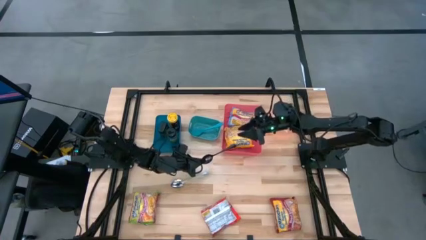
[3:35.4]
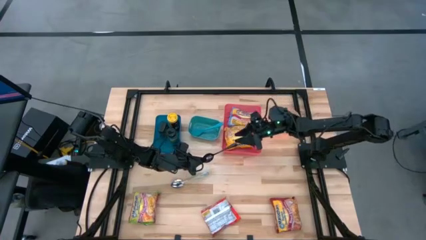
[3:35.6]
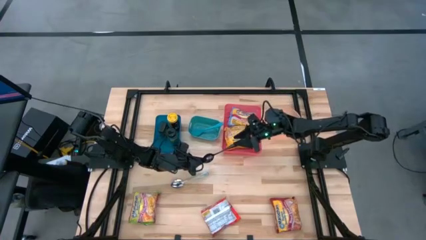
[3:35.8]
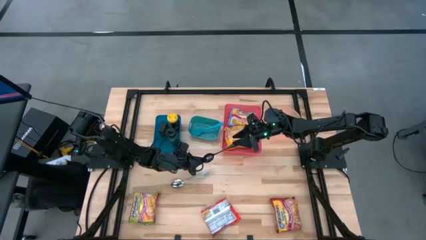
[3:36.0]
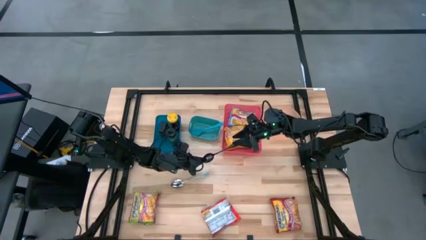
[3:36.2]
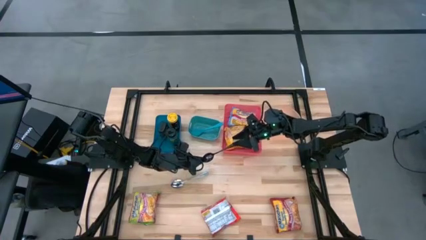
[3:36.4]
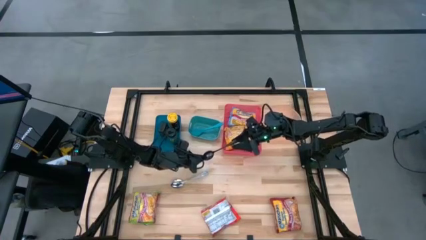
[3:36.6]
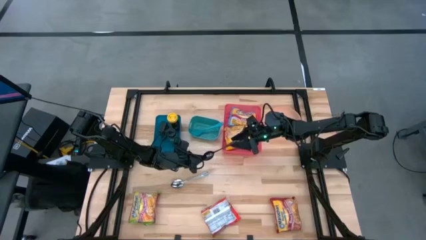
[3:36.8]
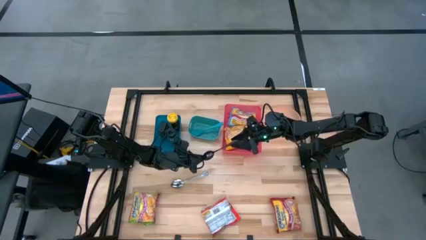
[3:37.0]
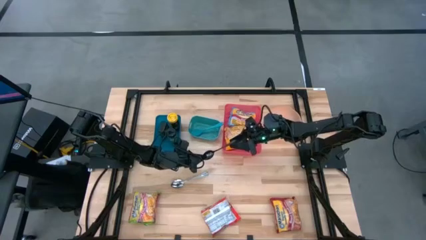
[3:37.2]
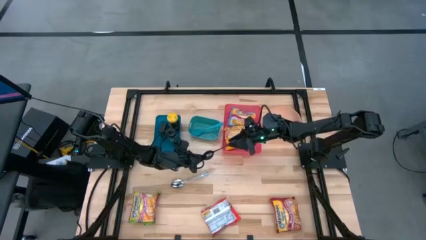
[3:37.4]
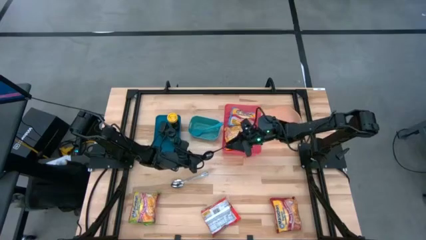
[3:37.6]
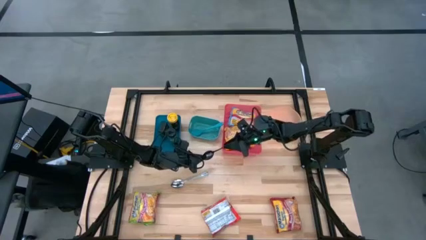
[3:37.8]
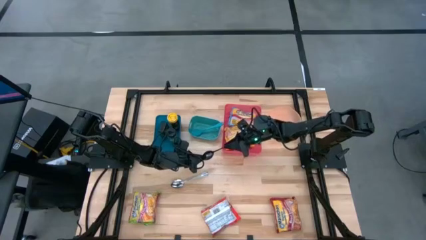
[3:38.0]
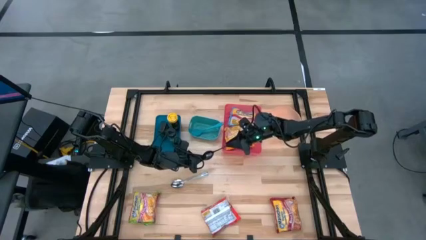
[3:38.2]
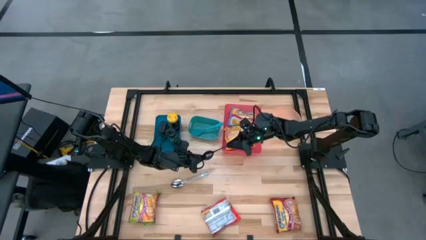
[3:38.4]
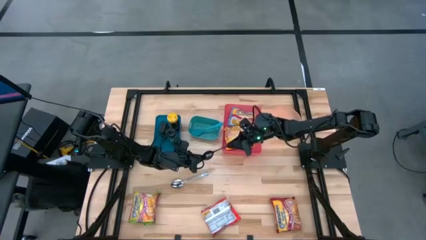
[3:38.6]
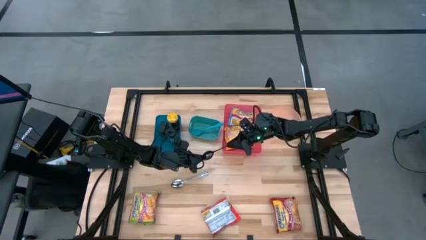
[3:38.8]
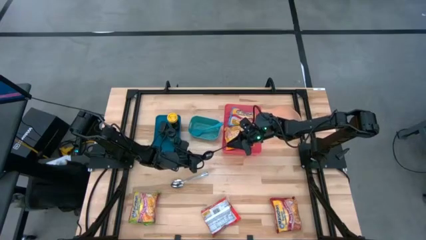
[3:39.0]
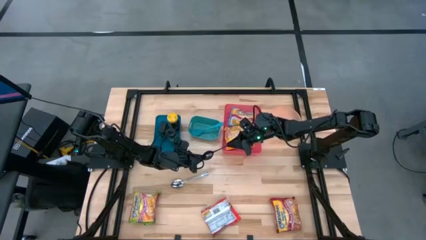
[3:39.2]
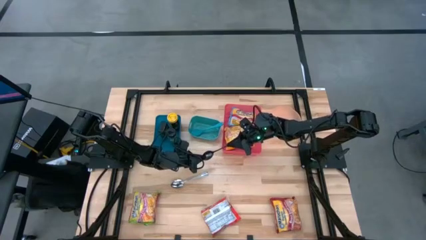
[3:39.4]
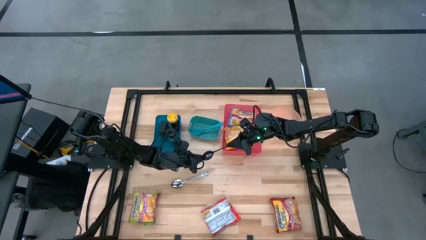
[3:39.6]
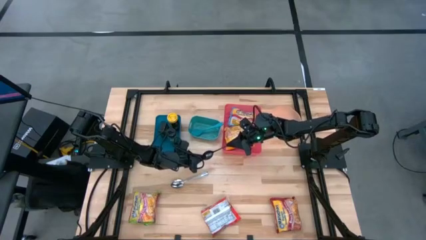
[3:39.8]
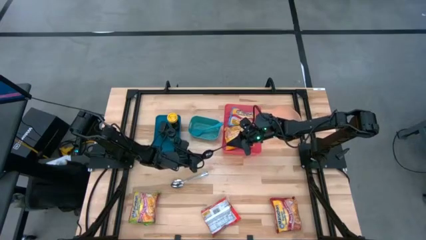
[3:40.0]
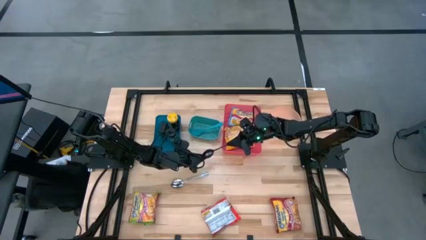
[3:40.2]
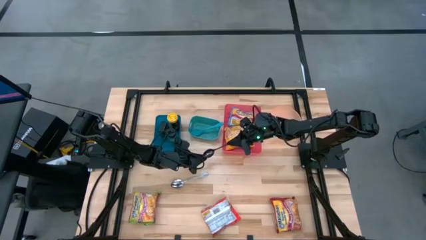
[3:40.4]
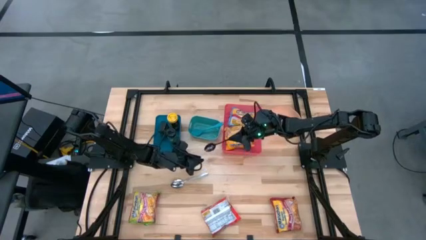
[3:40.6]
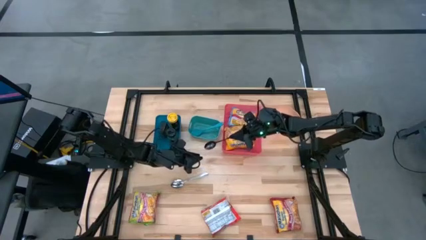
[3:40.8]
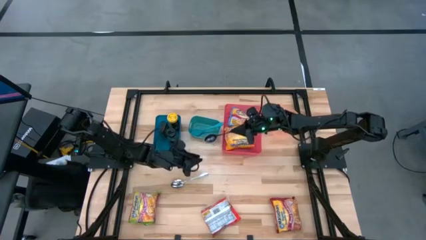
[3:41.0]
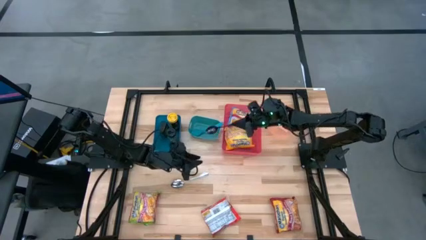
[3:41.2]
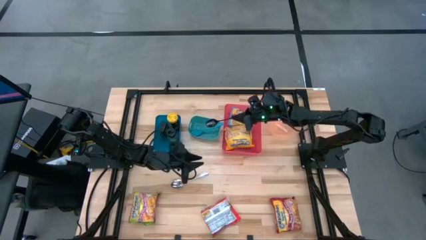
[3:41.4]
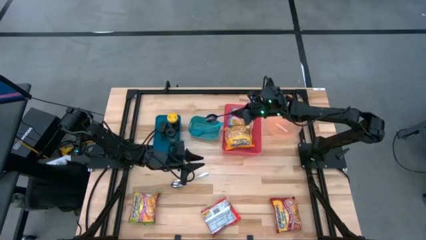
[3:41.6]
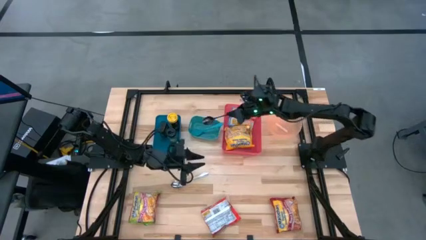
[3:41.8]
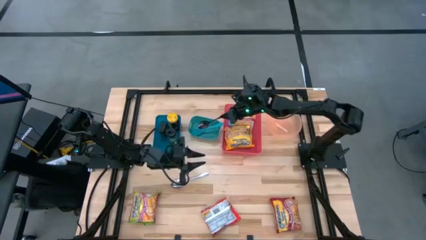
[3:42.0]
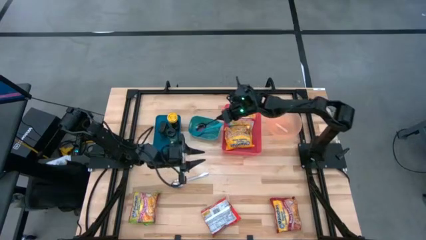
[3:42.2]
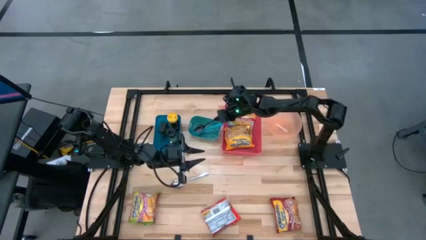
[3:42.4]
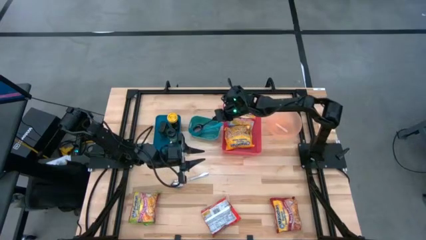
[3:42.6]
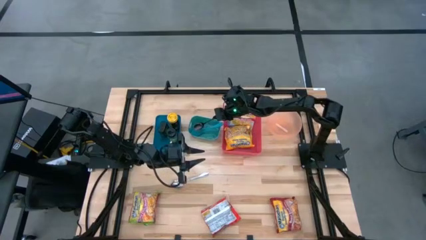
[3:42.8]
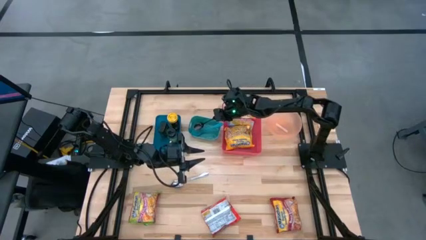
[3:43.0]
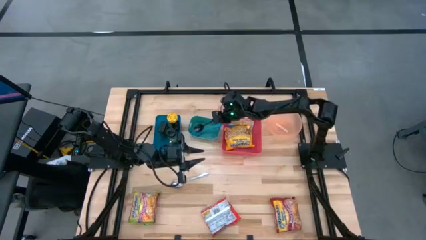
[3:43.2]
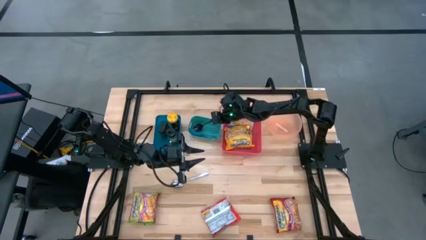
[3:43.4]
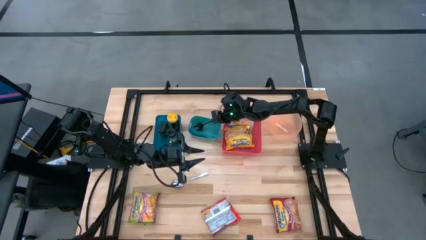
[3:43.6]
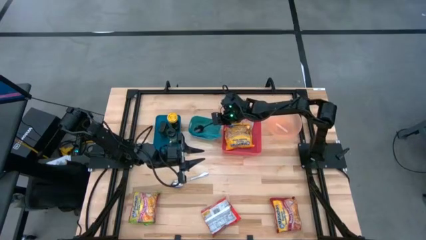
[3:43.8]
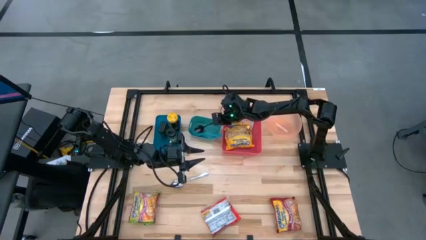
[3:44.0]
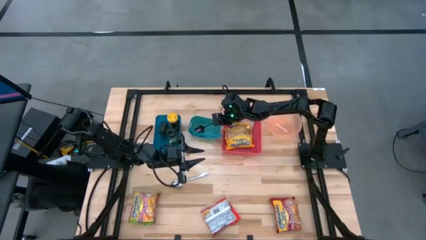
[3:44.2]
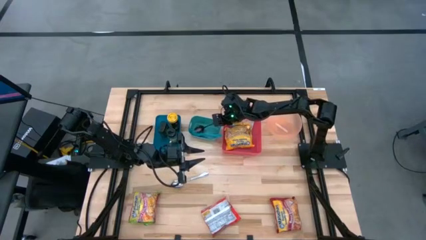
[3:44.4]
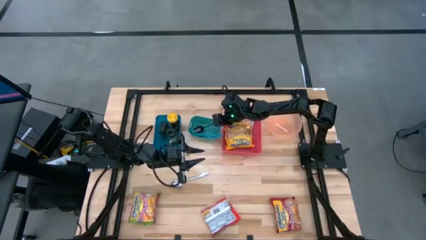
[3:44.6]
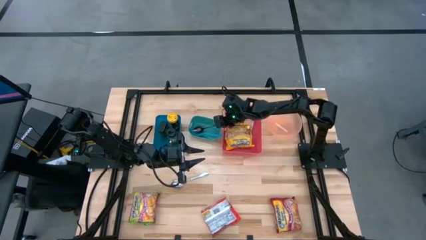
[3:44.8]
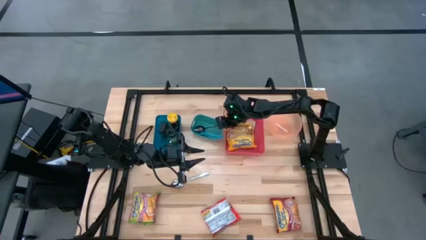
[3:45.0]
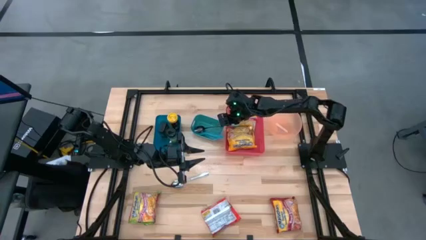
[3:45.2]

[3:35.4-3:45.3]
Task: Pick & Place Food Item
Put the black spoon into the green bin

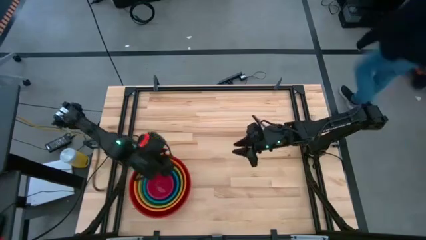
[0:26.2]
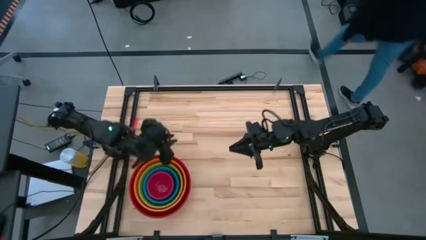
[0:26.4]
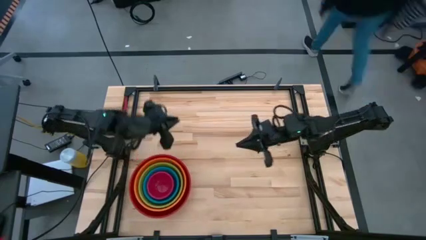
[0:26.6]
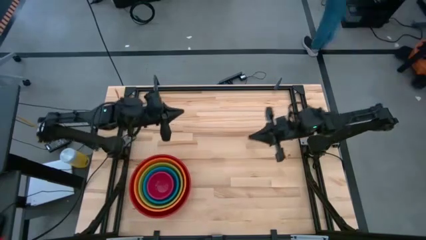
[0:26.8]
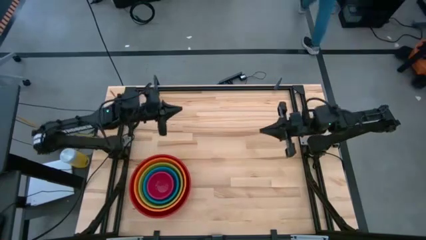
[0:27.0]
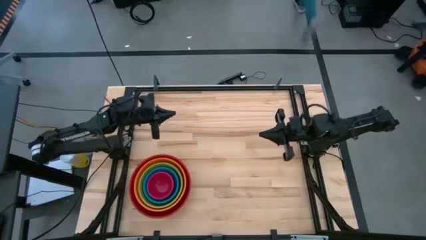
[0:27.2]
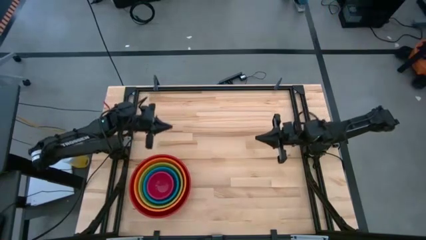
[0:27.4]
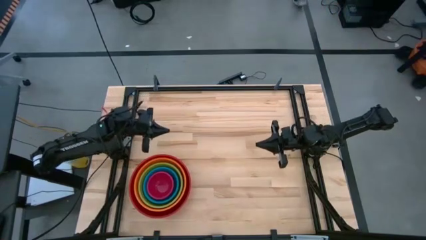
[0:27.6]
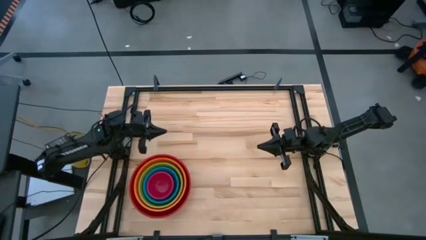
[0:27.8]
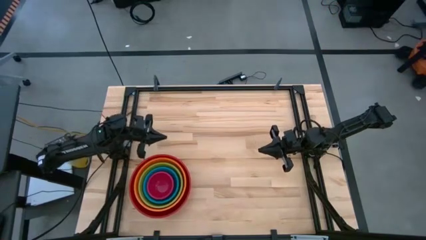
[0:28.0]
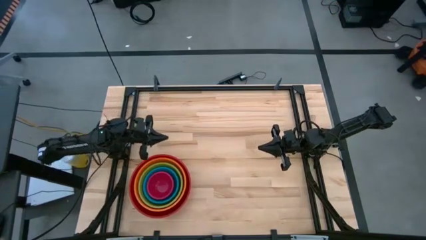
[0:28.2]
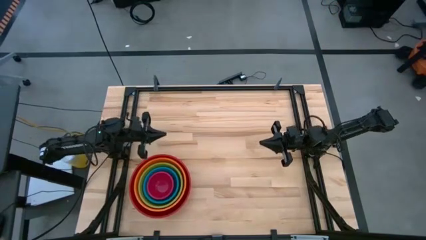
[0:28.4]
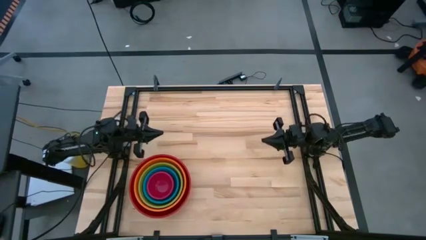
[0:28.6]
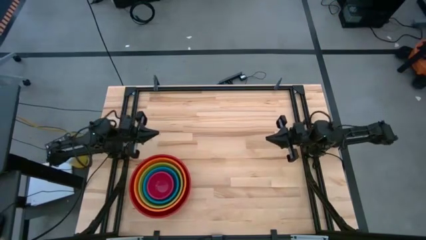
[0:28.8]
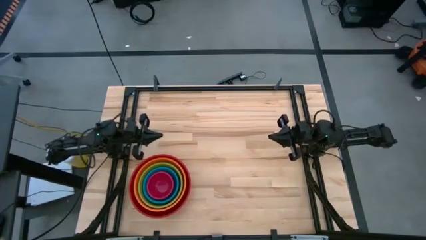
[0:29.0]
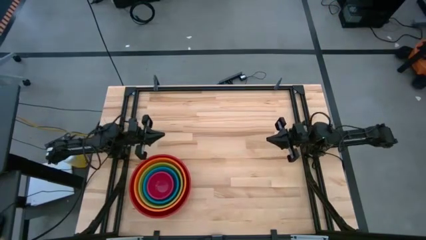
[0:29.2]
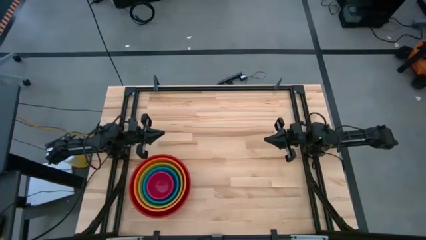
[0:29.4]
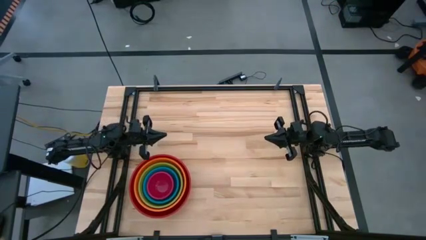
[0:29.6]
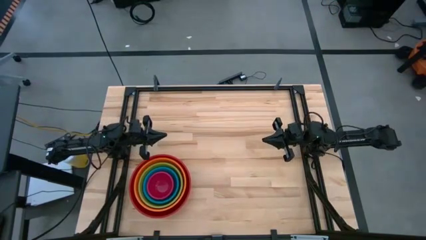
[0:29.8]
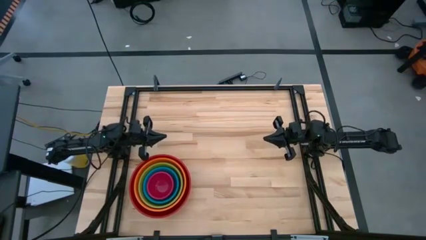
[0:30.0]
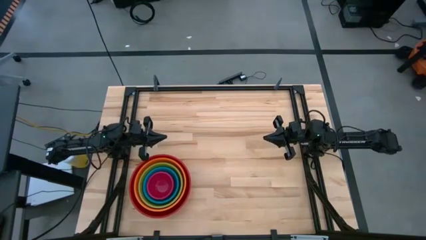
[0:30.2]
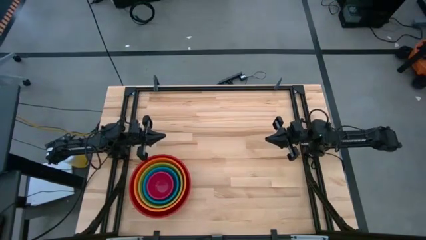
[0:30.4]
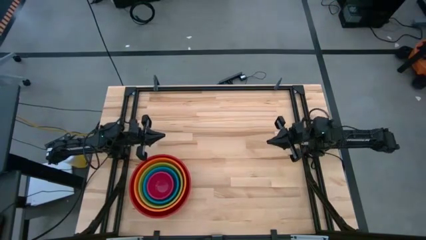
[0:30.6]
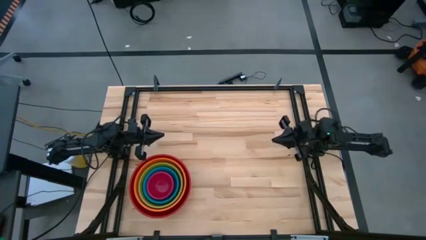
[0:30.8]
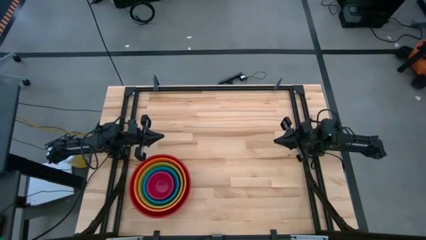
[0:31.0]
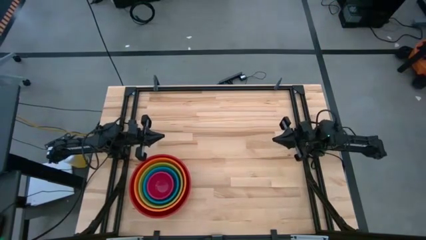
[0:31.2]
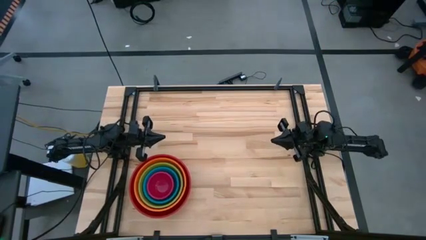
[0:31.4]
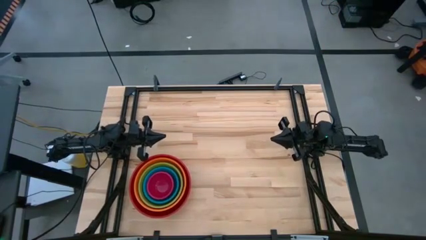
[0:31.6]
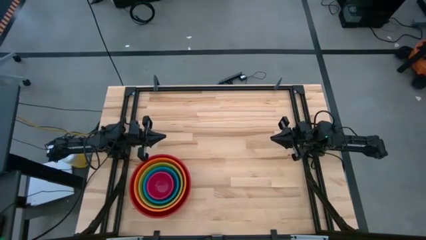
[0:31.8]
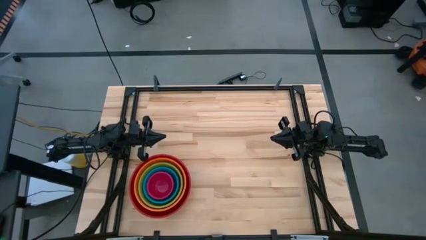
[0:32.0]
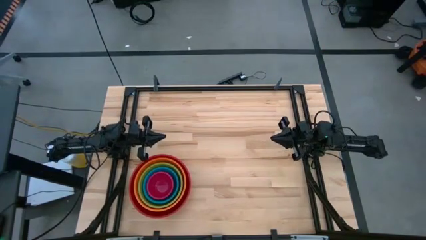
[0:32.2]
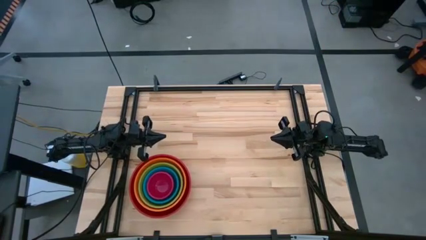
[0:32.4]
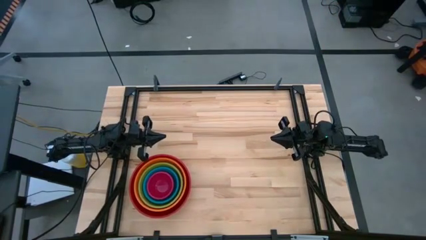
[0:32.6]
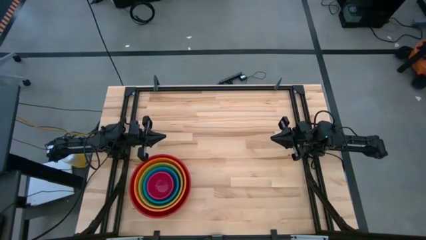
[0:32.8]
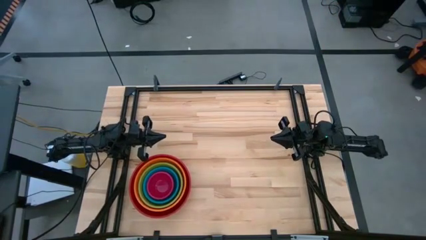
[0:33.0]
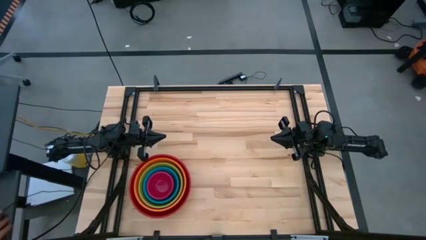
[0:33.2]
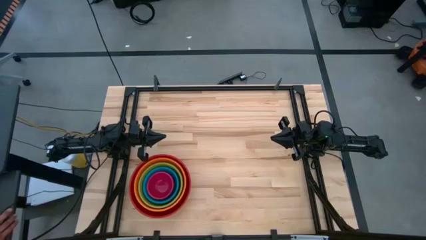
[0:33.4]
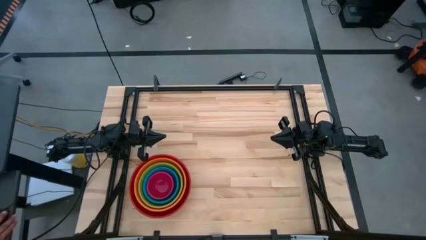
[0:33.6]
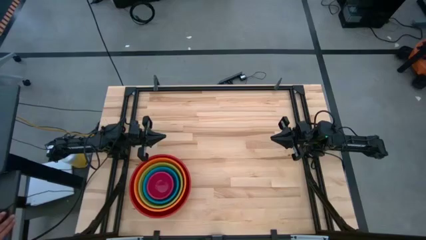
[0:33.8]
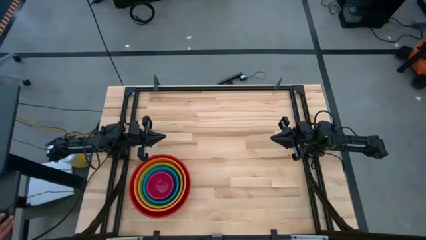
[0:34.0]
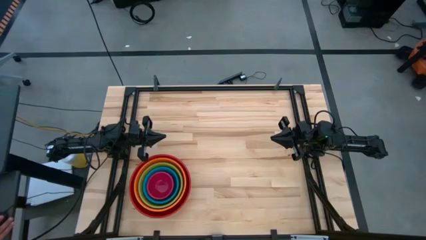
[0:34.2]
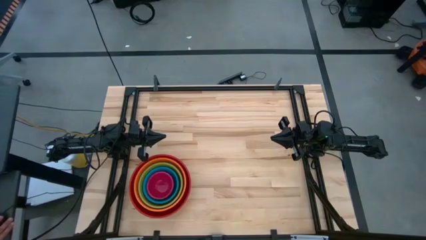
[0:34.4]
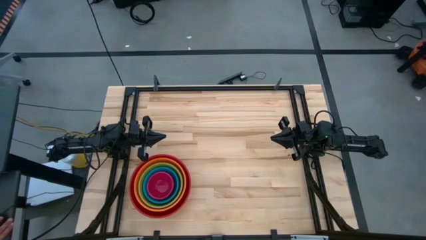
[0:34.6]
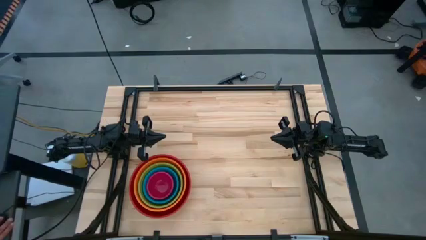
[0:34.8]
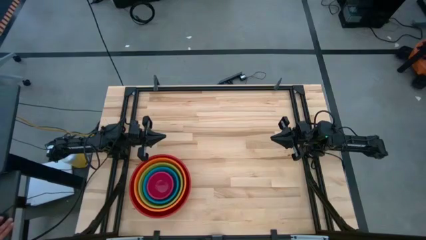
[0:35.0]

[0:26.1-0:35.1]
Task: Nest bowls inside each other by size order
Return to Home Position
